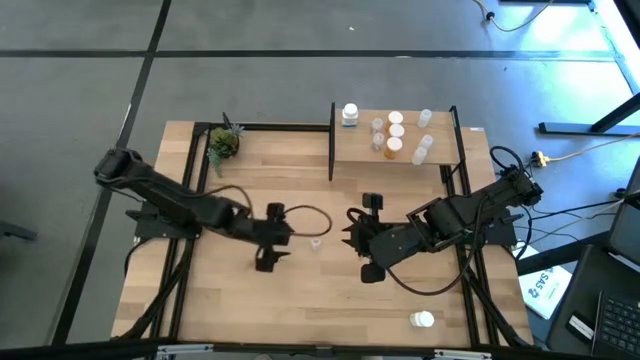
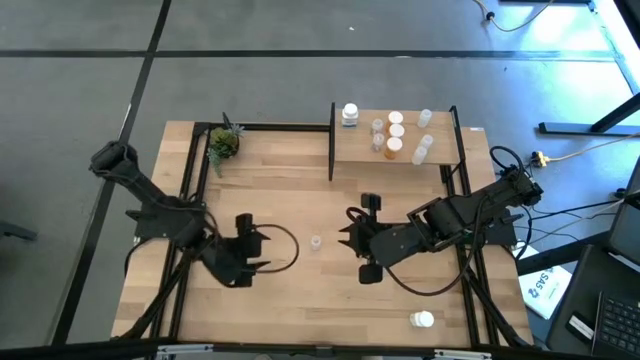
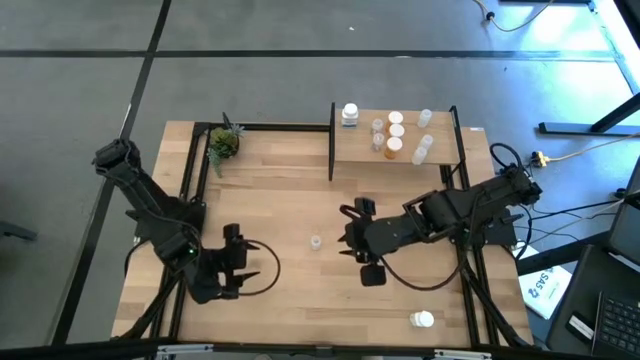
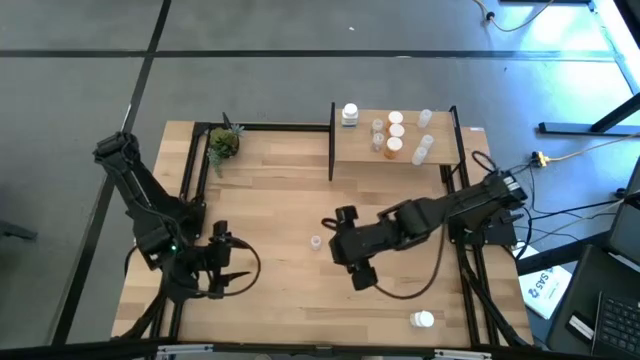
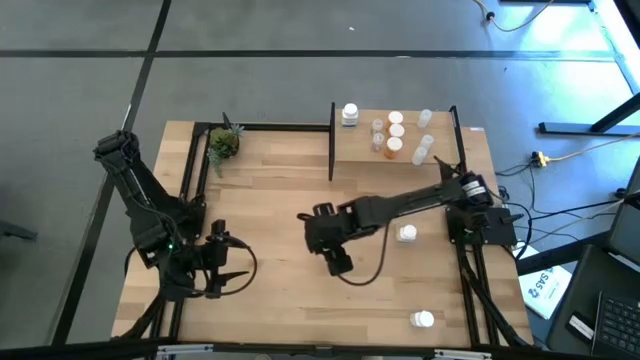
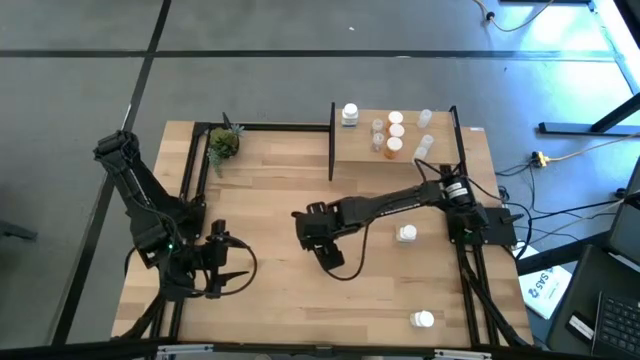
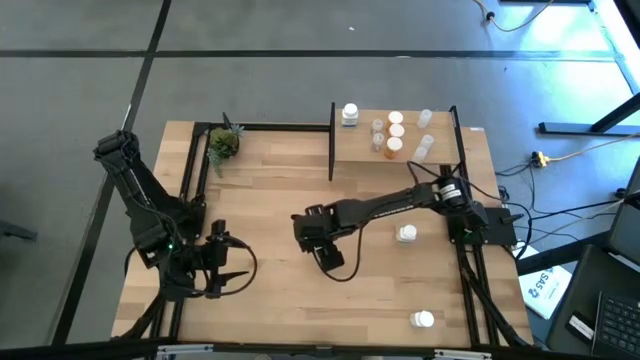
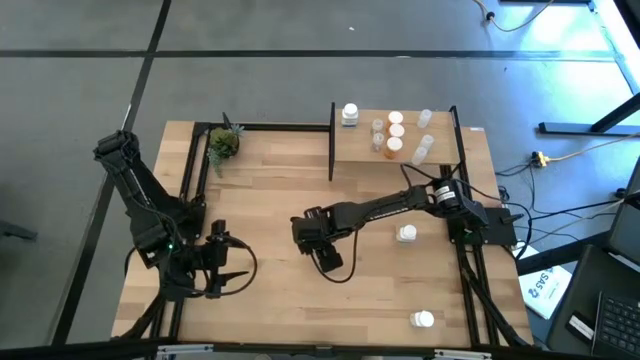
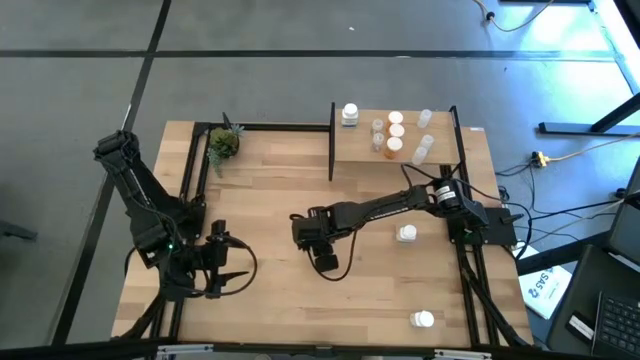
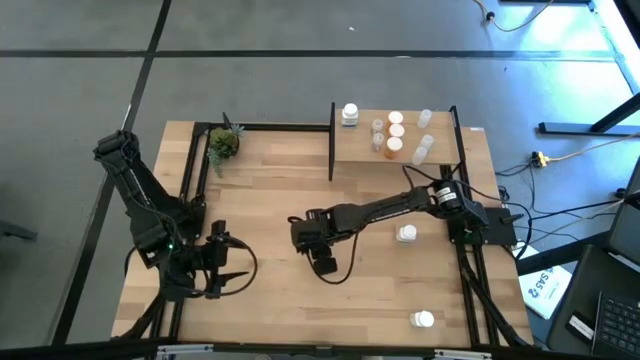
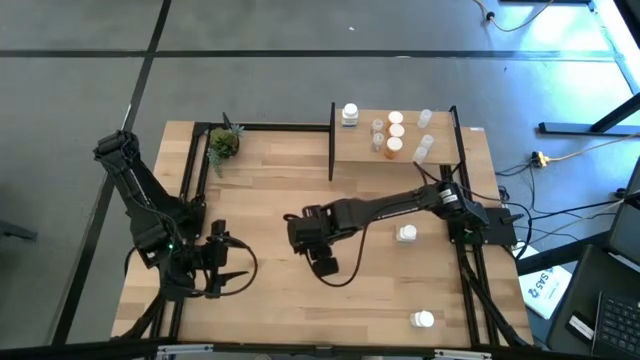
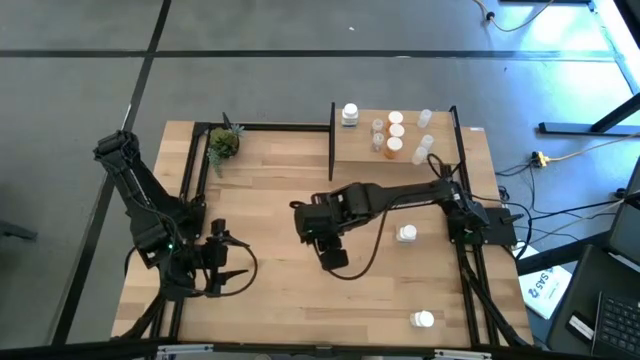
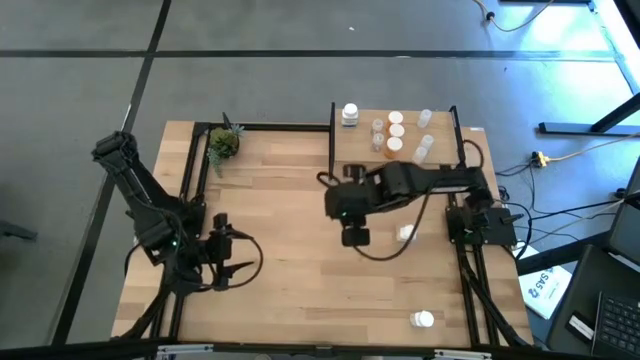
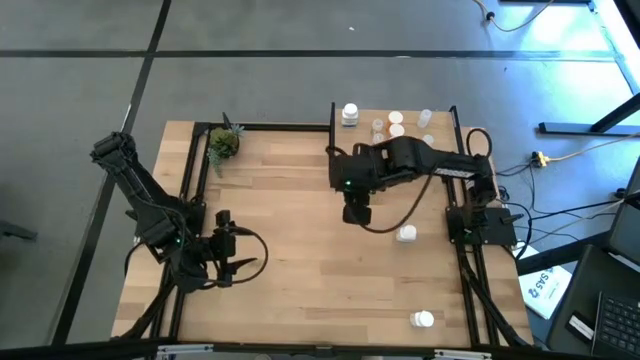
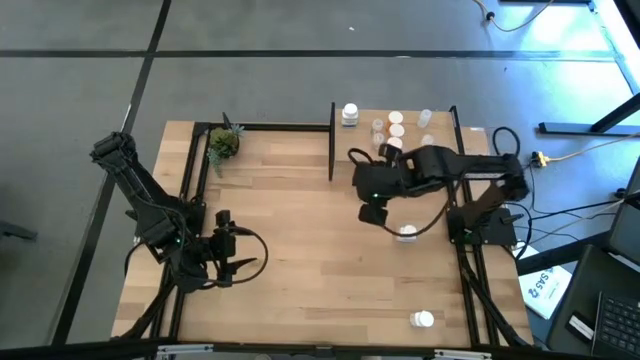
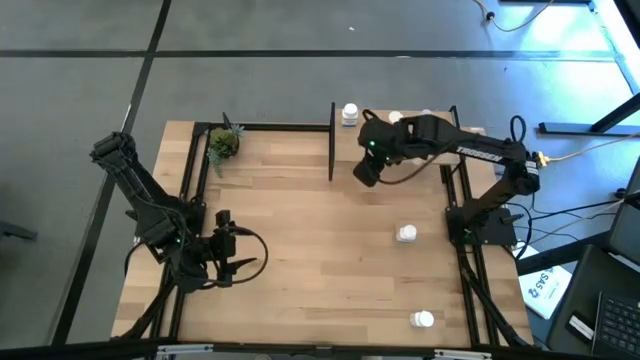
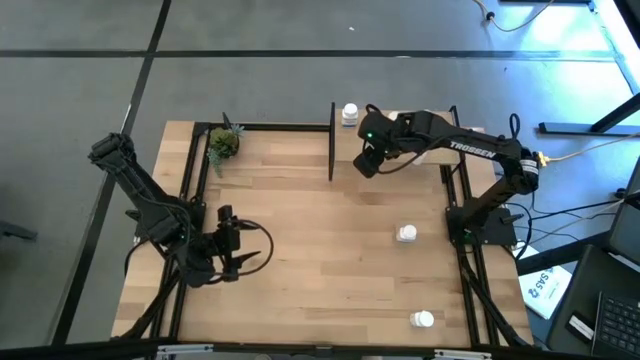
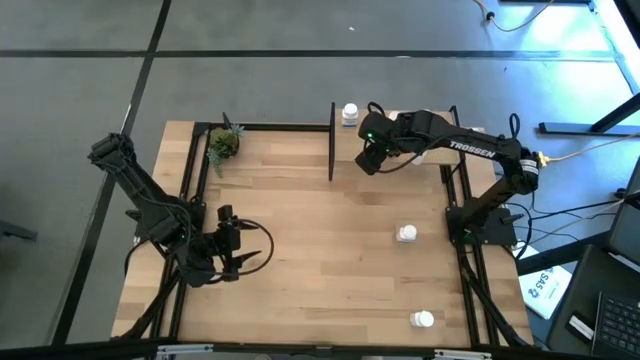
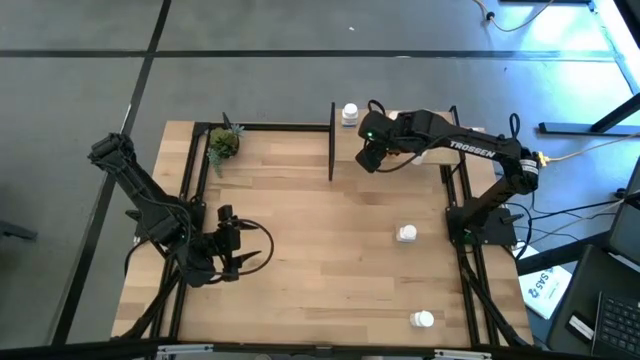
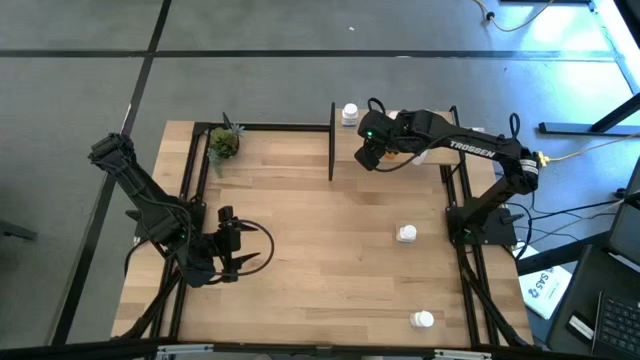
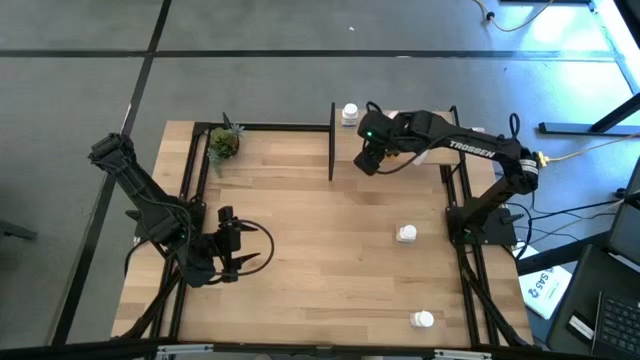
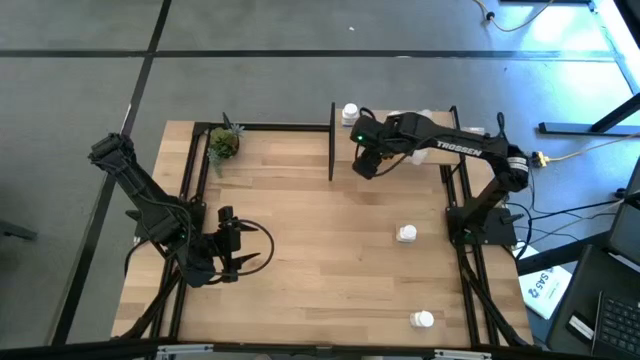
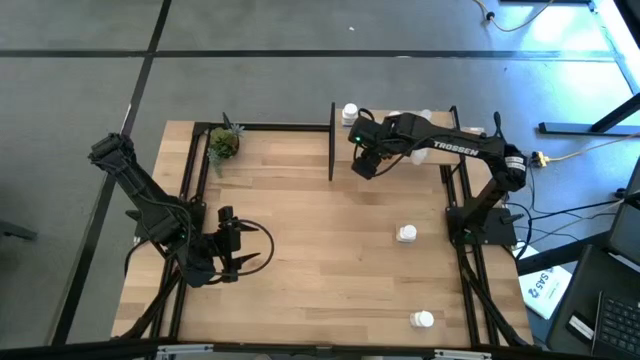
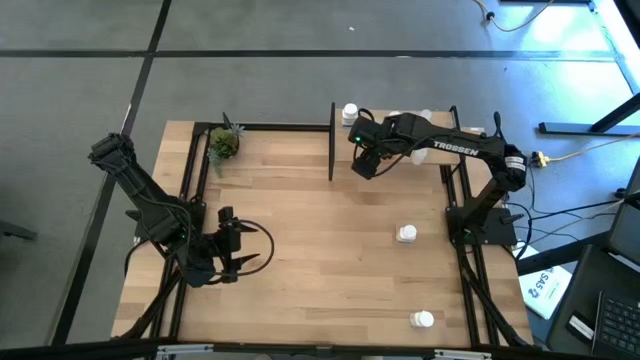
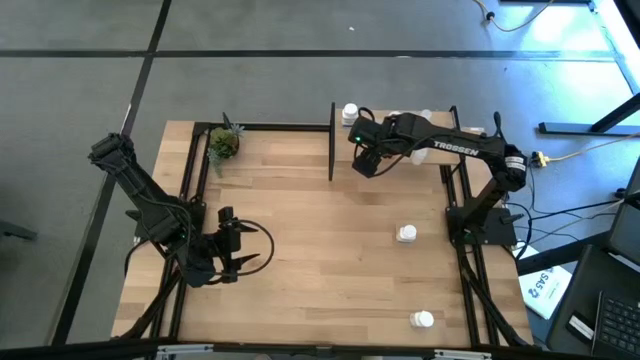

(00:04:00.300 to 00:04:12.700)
Task: Pick and place medicine bottles onto shelf by color
Put the green transparent pill bottle on the shelf aligned with the other green transparent pill bottle

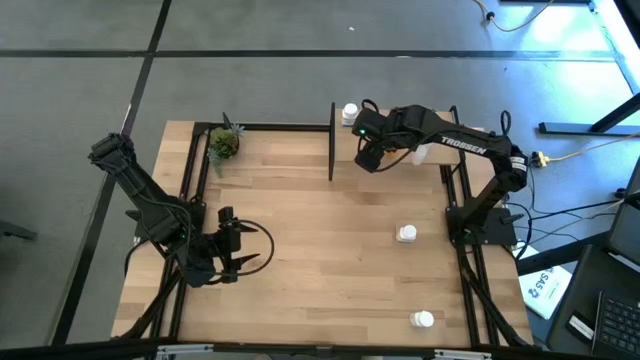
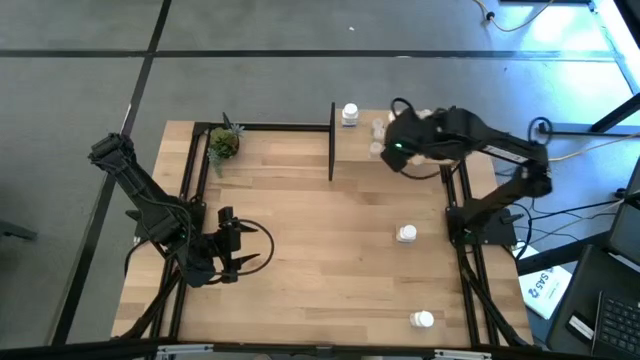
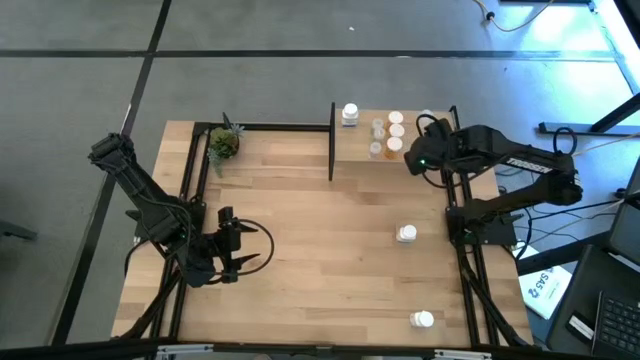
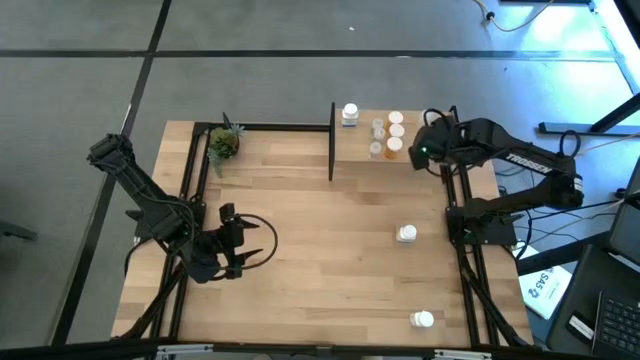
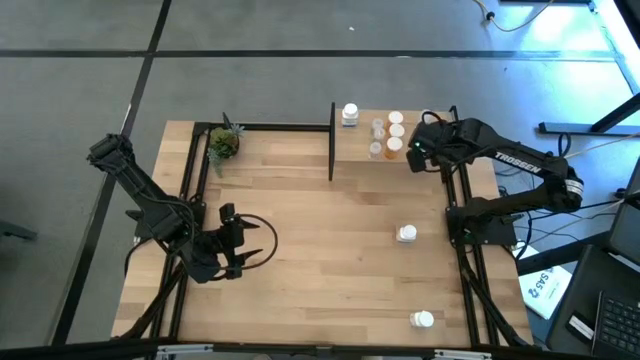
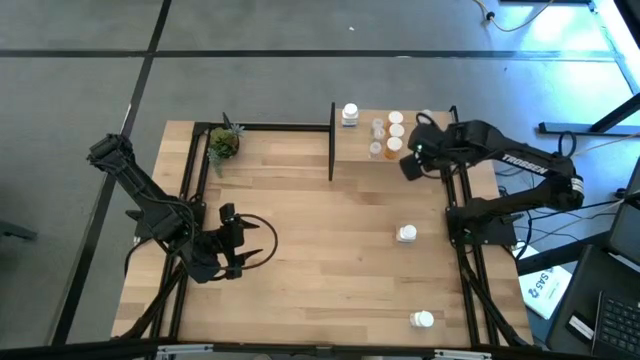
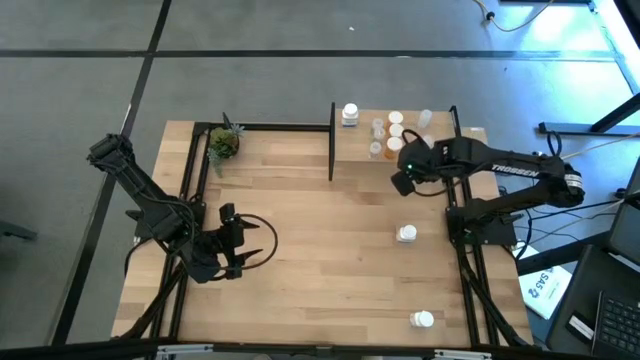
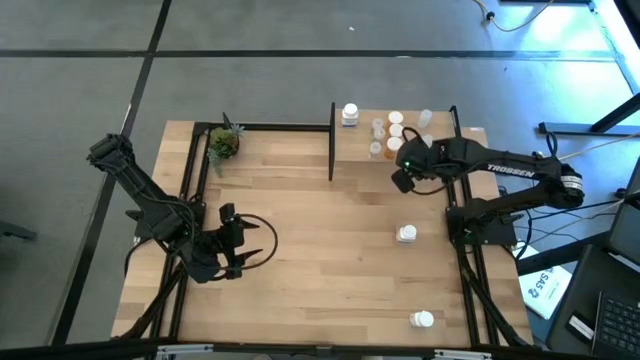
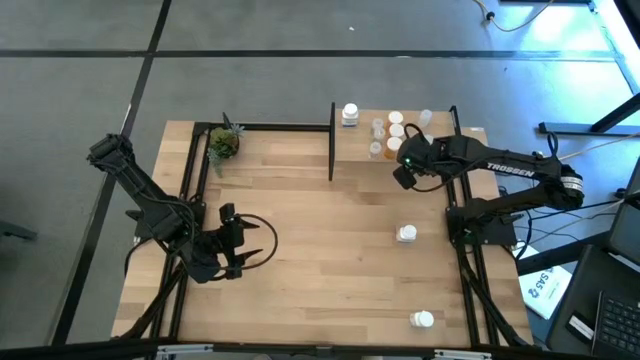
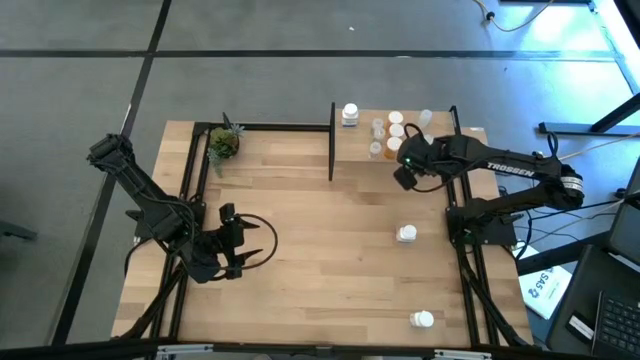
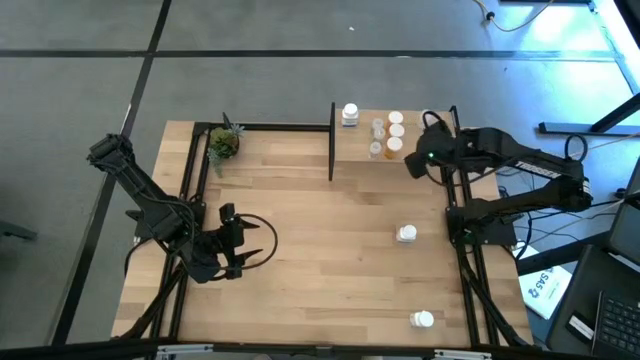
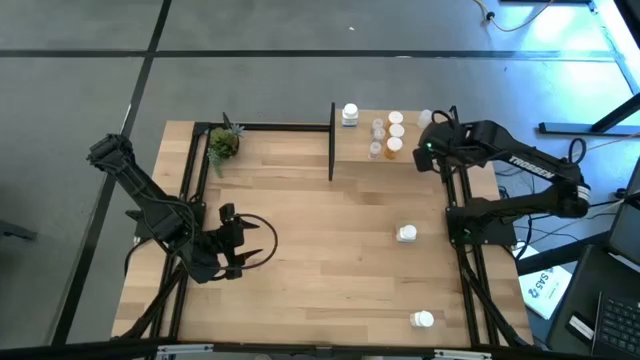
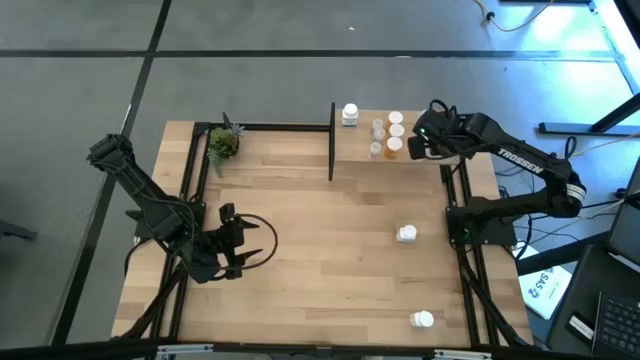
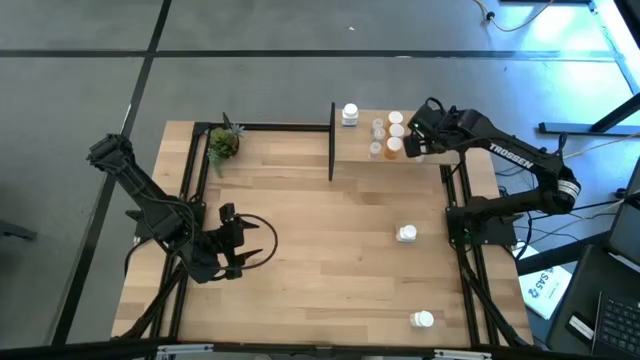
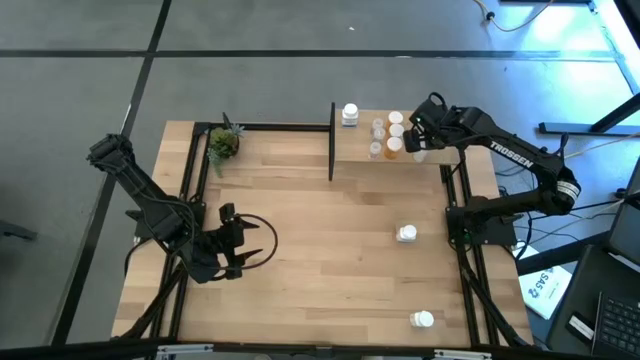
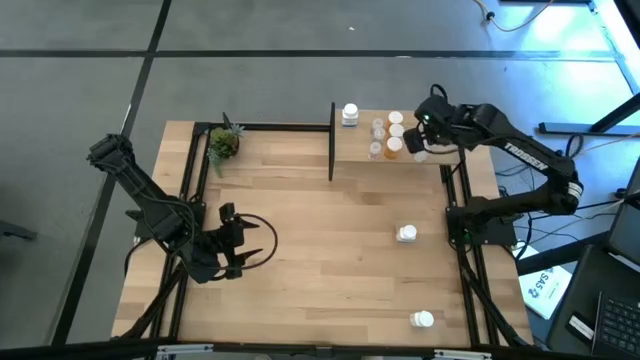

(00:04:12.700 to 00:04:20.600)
Adjust the right transparent pills bottle on the shelf

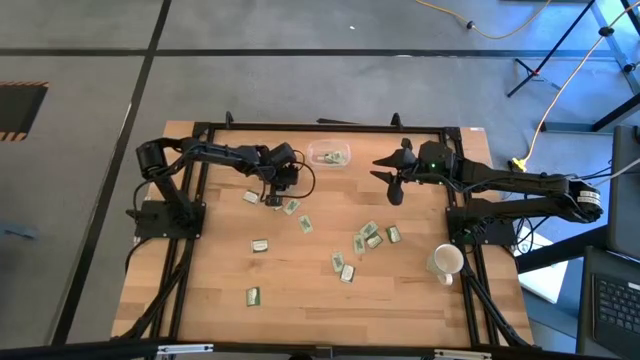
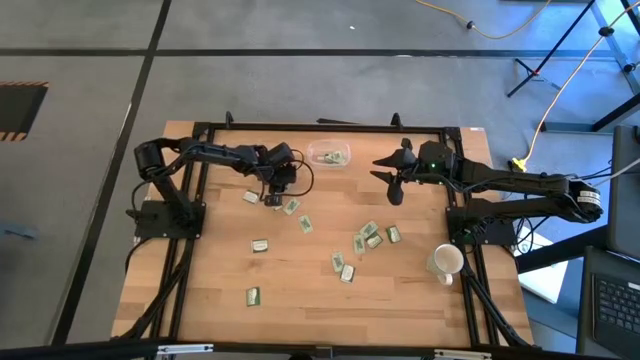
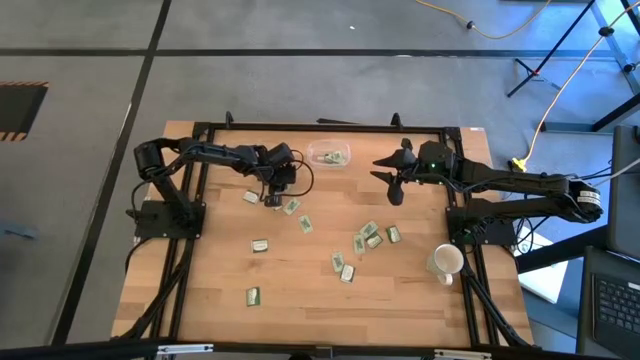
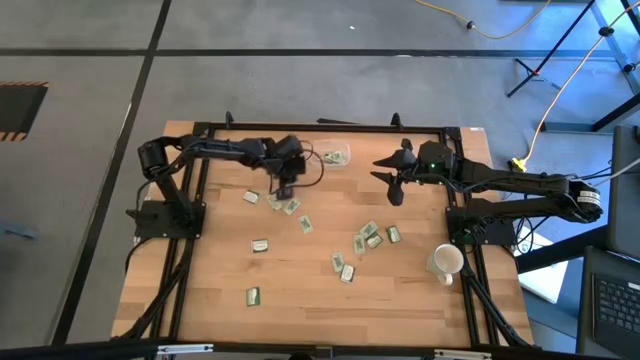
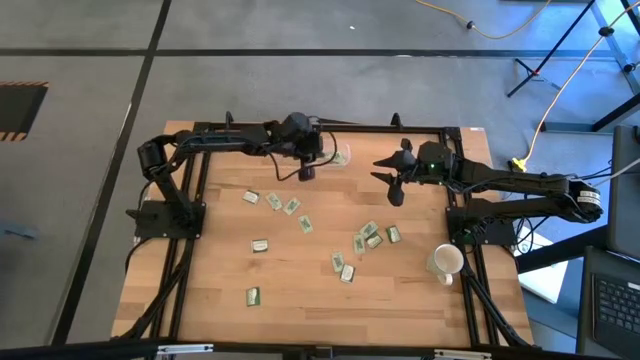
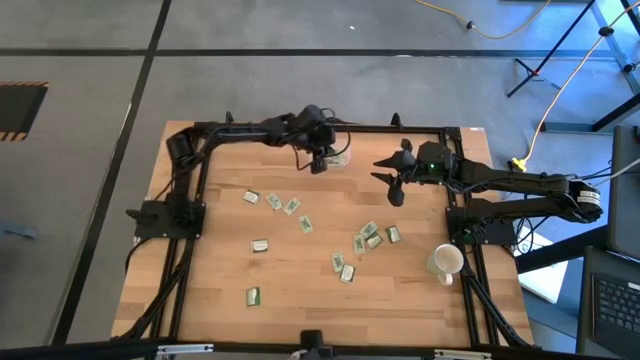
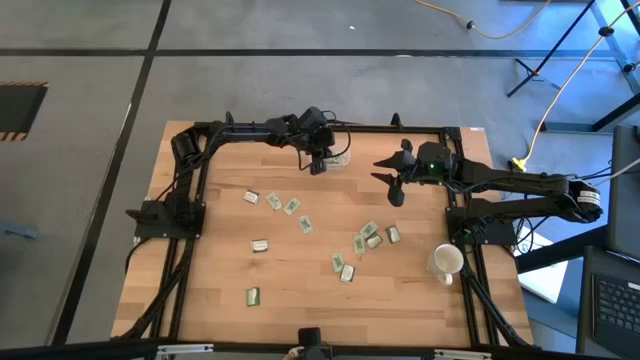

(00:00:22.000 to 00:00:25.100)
Task: Pick and place items into bin
Put the white stevia packet into the transparent bin
